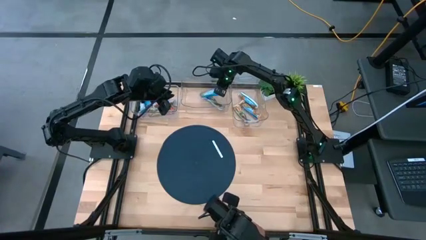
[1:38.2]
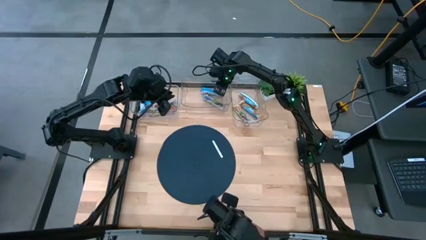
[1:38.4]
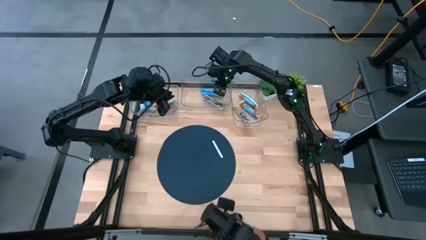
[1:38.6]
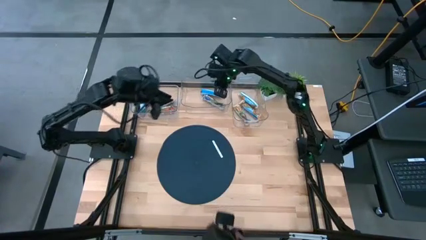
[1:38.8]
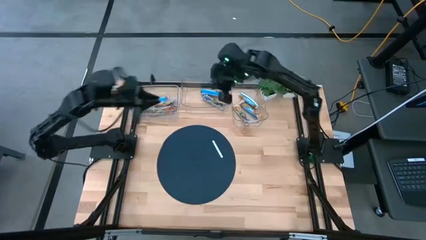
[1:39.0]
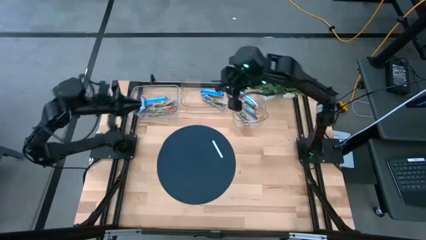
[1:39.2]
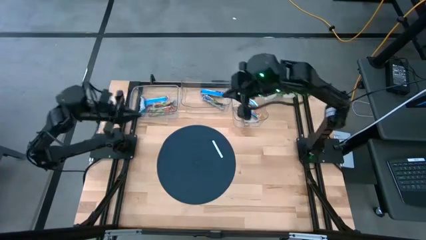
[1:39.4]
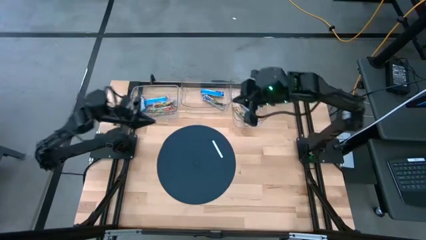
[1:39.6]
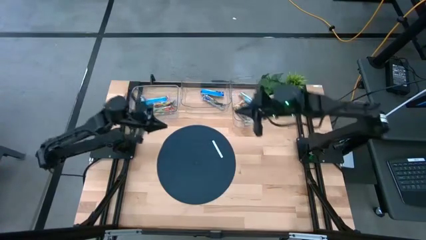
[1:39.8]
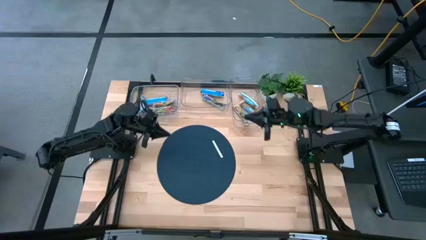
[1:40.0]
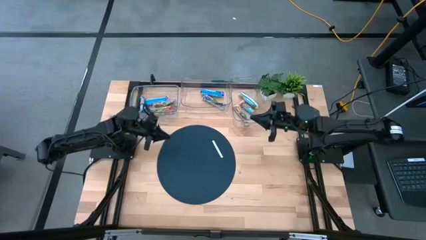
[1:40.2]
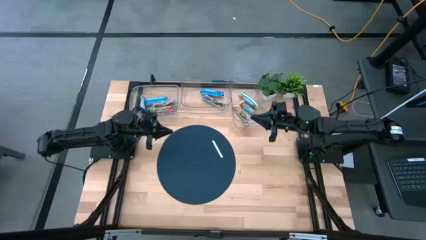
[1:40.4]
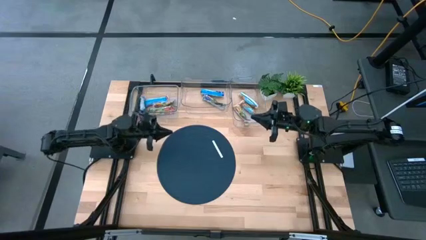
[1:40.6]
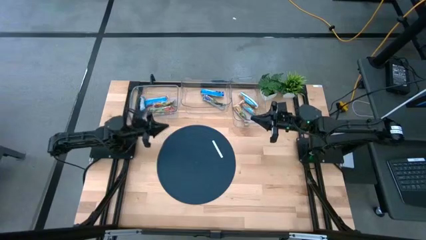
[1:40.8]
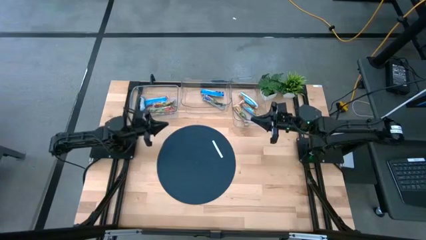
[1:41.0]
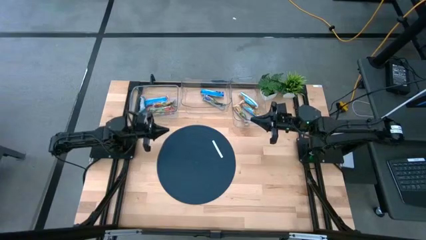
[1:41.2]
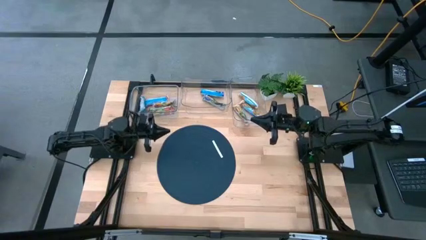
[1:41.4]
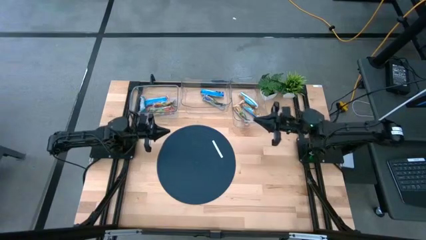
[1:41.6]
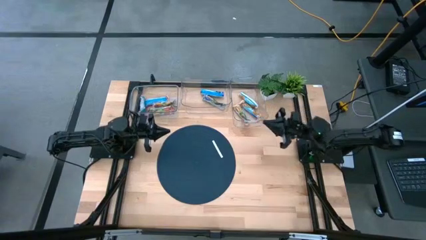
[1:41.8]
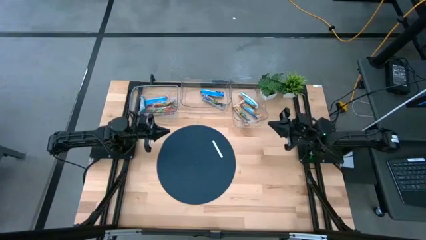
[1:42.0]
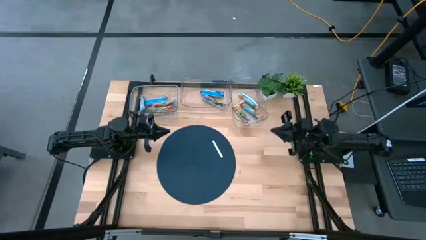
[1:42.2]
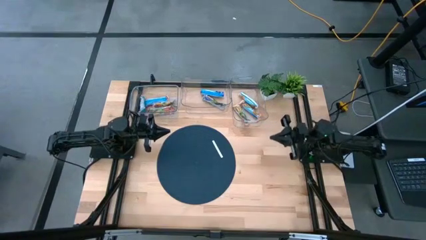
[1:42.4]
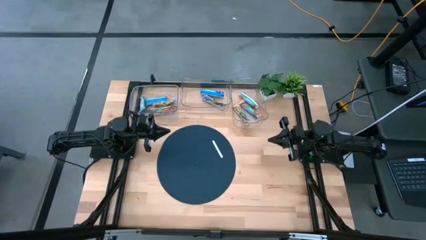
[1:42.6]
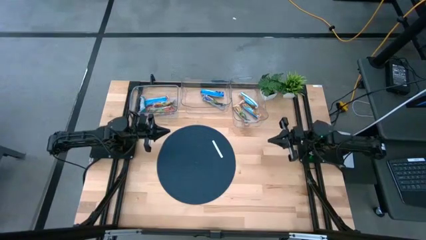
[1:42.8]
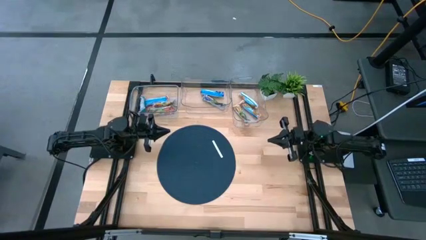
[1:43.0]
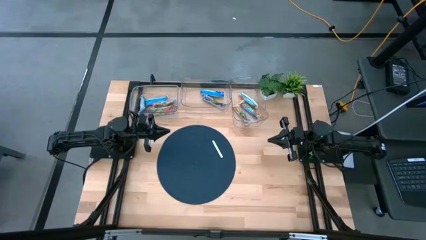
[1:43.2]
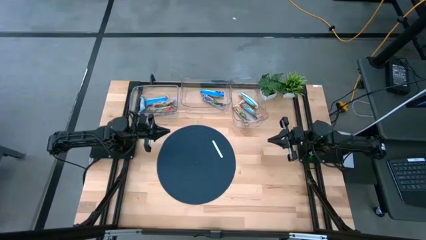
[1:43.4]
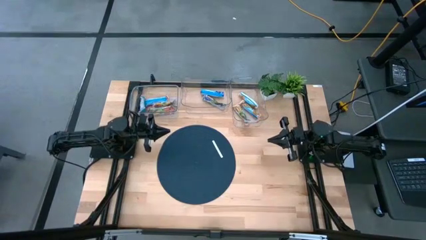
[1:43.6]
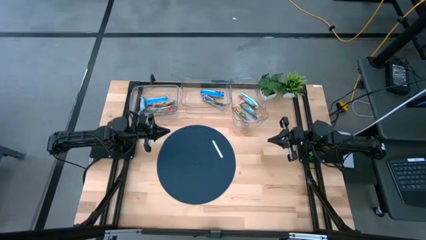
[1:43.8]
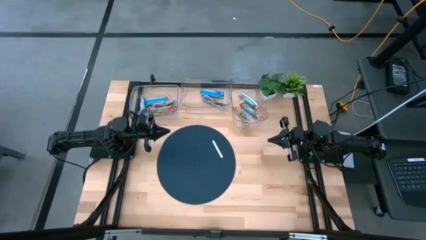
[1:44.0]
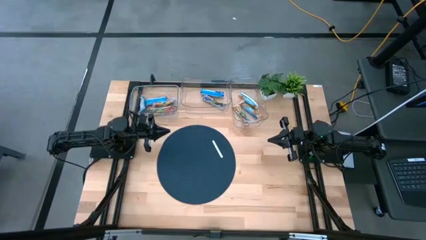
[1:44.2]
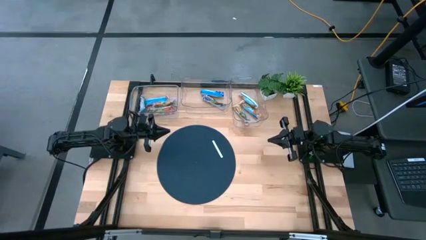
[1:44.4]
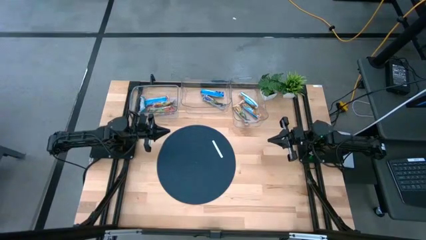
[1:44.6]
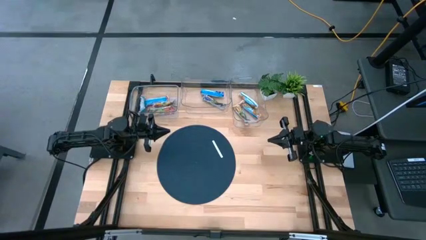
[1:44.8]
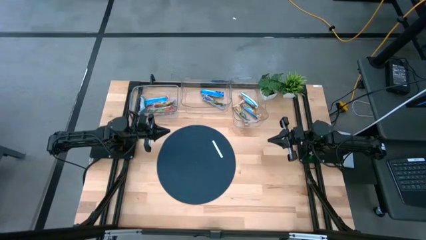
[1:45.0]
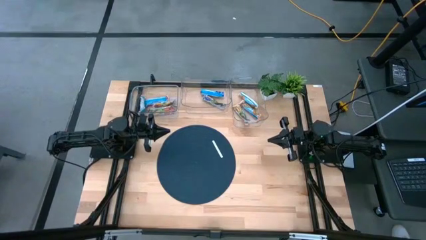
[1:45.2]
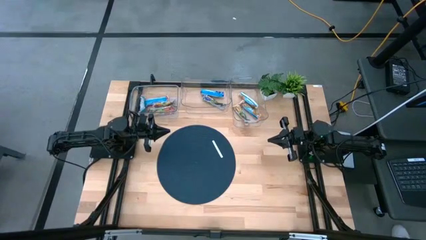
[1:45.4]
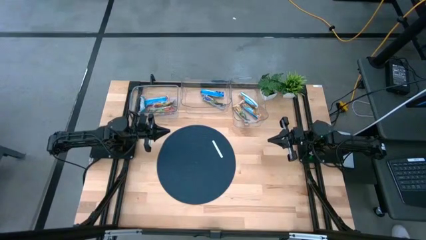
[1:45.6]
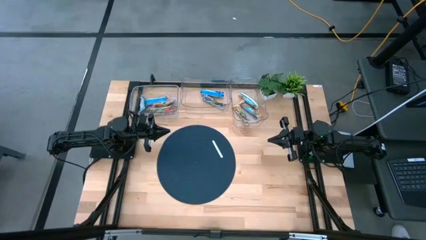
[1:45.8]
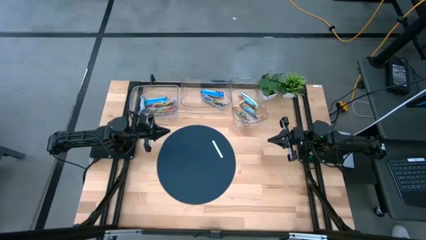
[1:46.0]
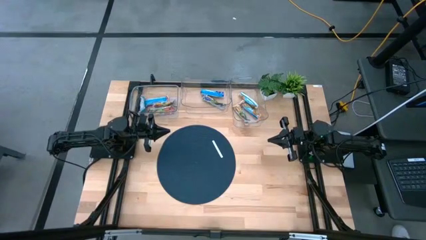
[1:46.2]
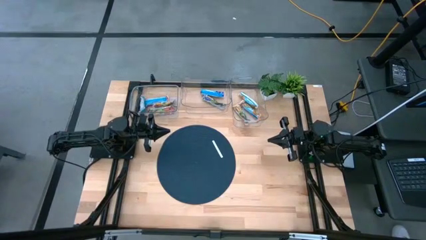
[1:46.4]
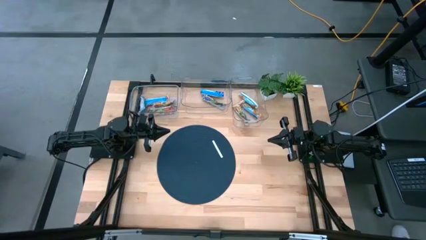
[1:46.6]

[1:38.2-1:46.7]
Task: Pick and place Granola Bars by type
Return to Home Position

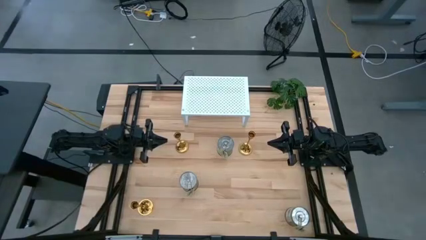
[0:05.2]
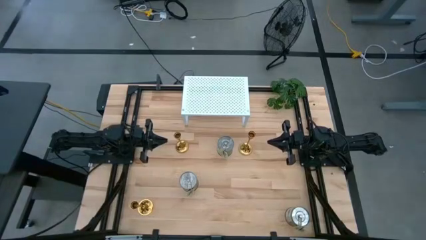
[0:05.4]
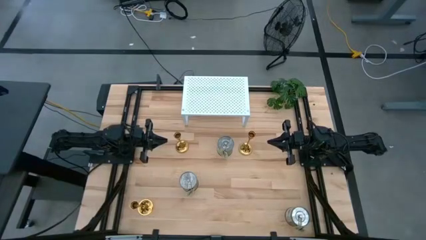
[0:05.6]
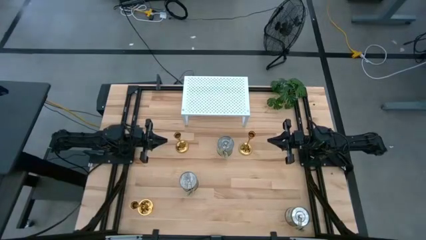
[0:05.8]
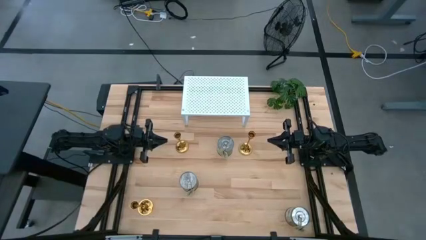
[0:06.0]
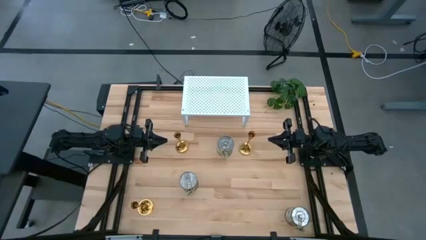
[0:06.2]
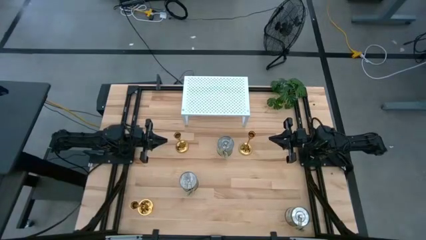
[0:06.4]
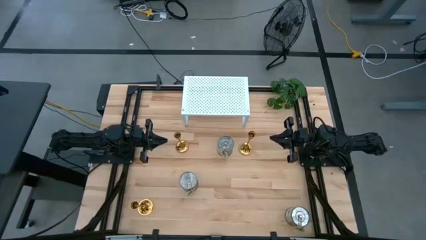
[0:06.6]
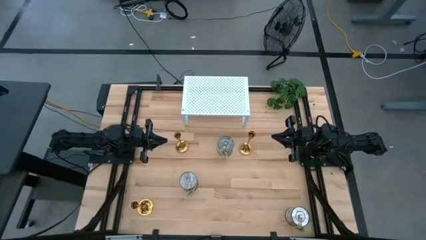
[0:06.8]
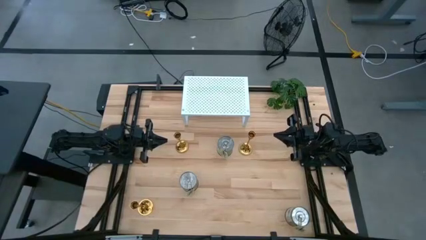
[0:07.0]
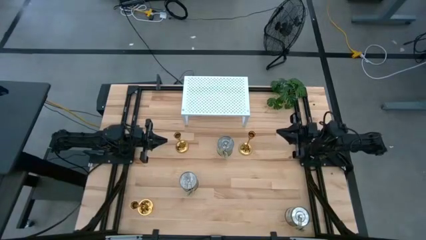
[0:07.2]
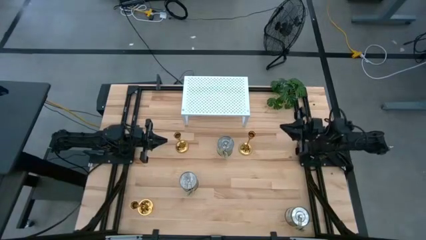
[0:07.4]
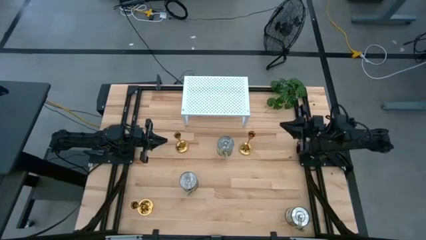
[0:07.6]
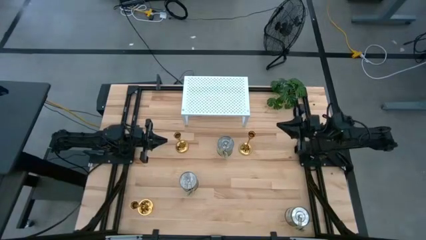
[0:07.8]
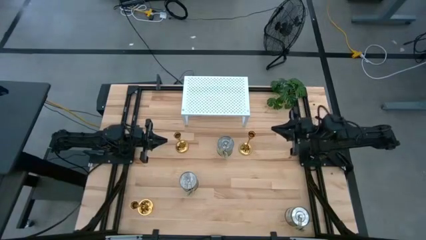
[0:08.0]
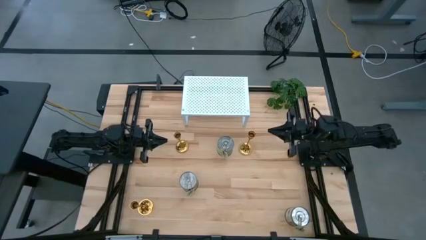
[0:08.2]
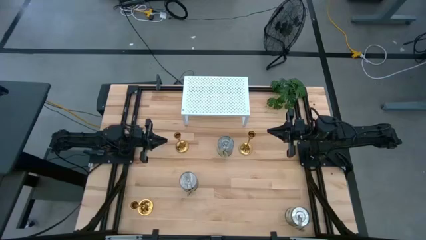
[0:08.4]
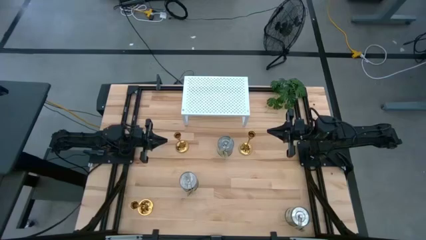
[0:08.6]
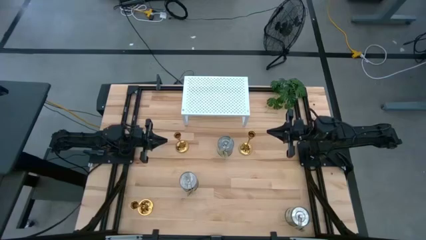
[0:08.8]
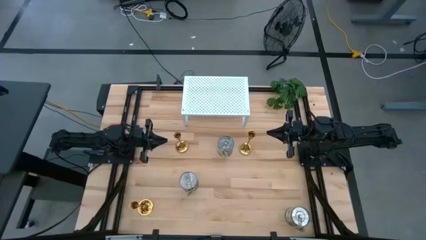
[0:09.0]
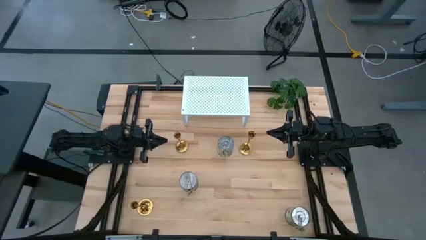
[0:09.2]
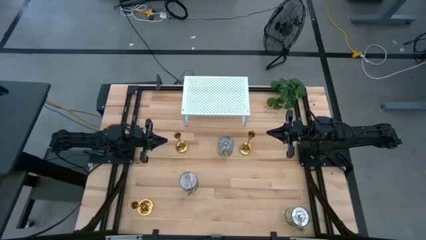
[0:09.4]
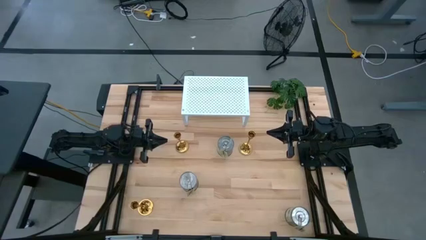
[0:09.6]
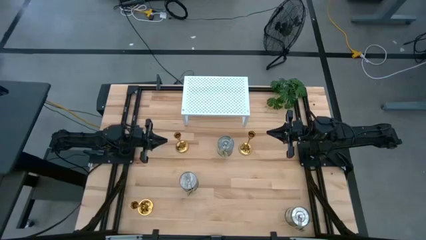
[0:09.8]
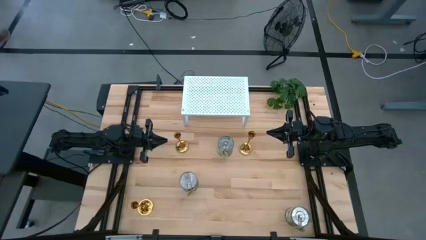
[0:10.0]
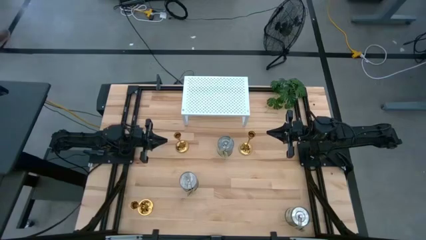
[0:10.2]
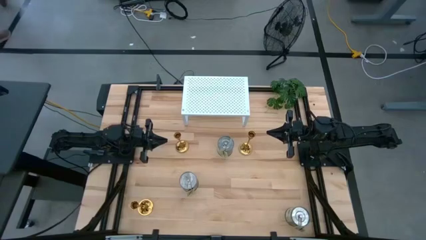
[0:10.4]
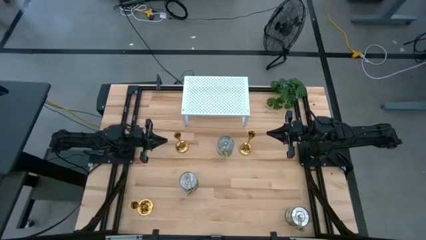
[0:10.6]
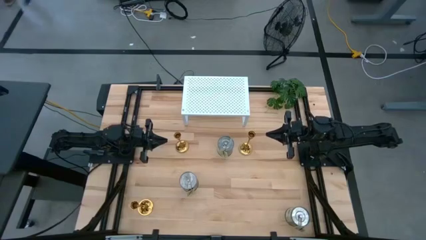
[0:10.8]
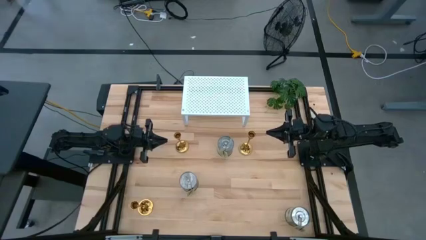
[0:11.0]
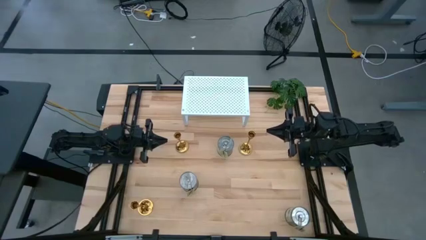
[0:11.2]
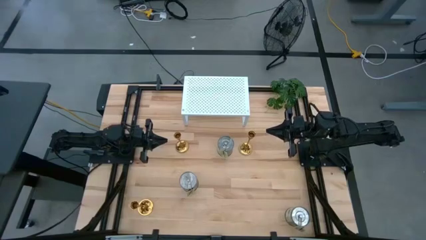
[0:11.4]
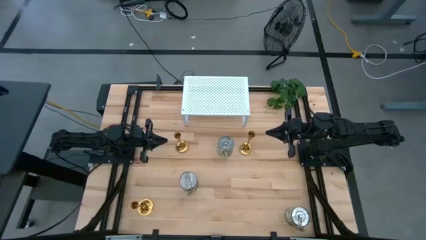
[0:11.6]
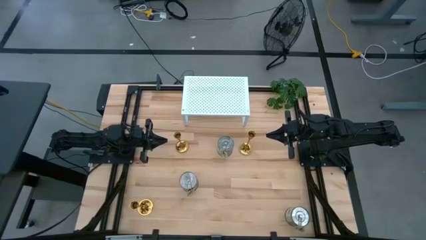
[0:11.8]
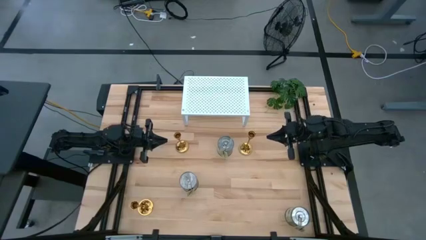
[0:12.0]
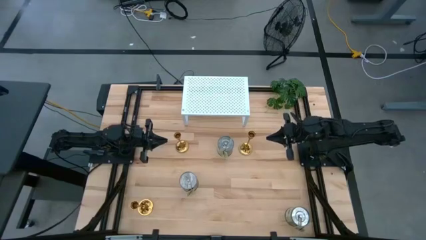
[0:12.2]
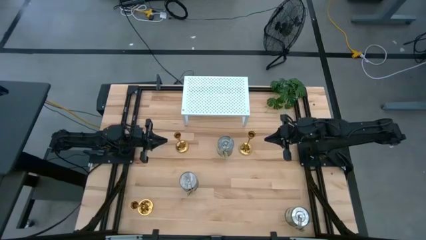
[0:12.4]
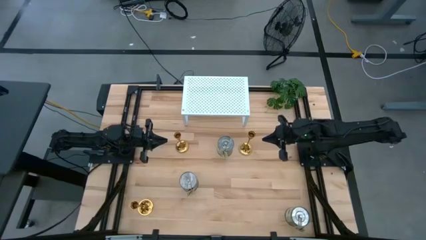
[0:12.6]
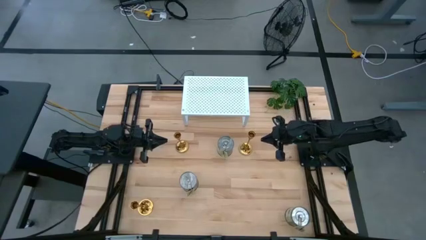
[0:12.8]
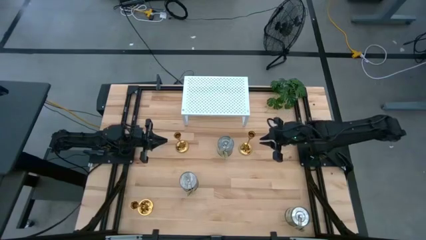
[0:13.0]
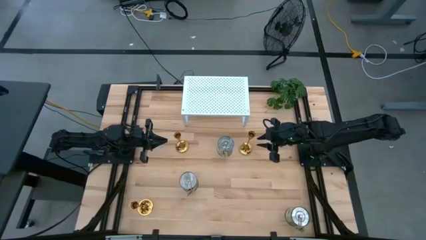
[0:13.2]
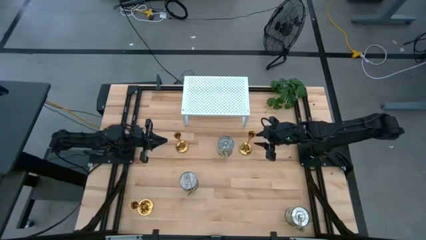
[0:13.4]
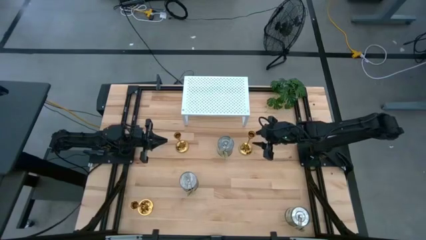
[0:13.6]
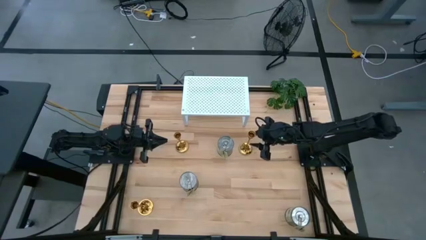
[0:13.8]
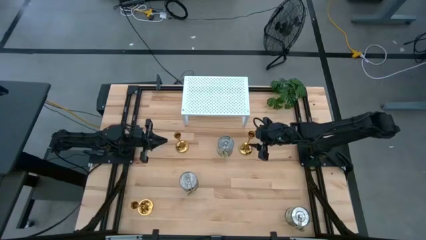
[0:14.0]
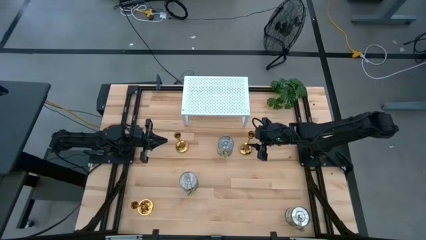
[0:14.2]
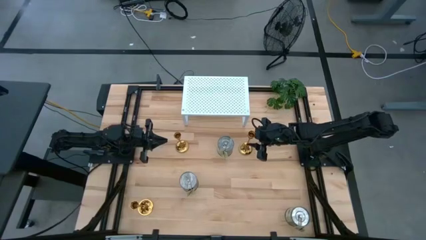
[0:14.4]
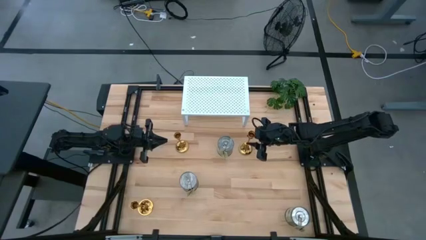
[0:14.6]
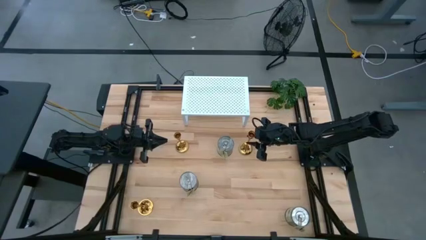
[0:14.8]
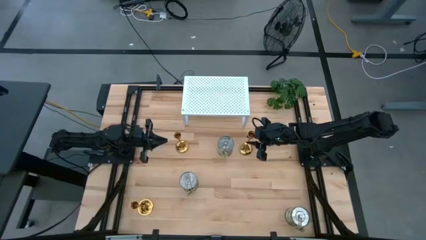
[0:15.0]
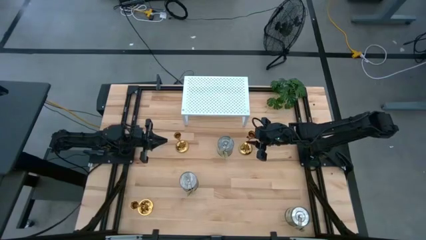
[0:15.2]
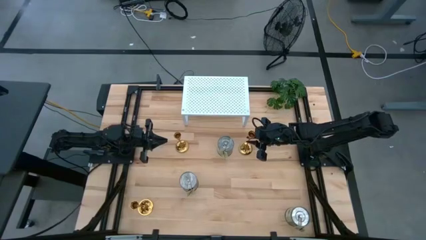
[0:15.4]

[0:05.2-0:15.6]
Task: Pick & Place candle stick holders
Put the right candle holder on the shelf
